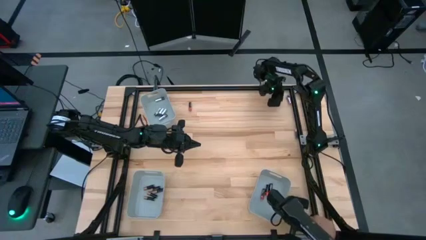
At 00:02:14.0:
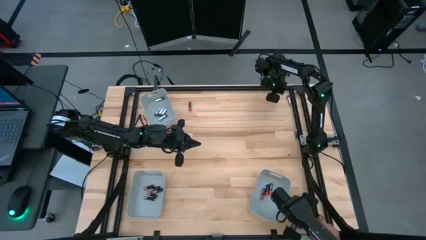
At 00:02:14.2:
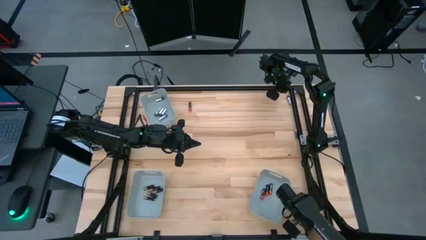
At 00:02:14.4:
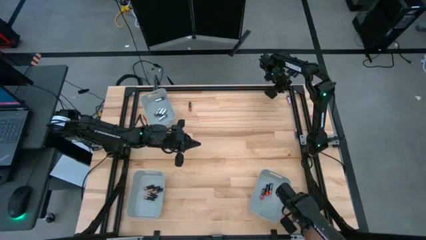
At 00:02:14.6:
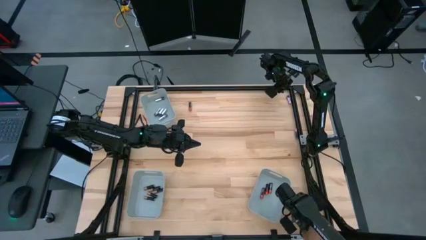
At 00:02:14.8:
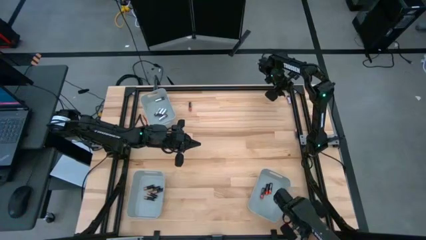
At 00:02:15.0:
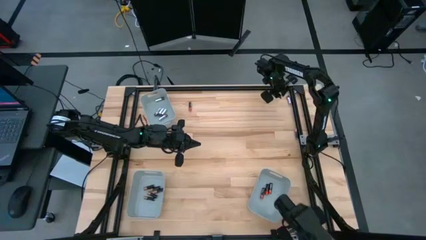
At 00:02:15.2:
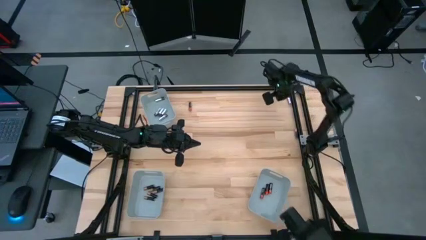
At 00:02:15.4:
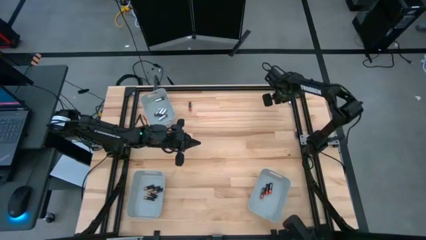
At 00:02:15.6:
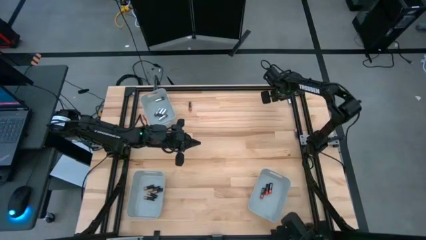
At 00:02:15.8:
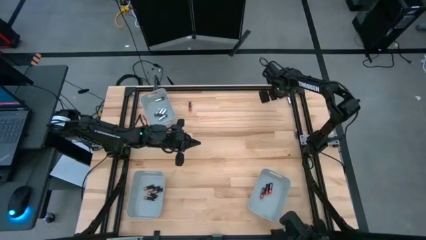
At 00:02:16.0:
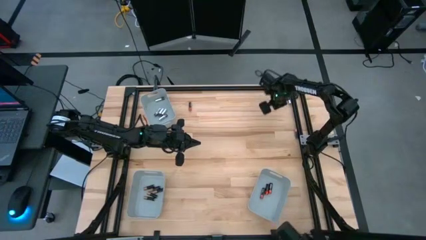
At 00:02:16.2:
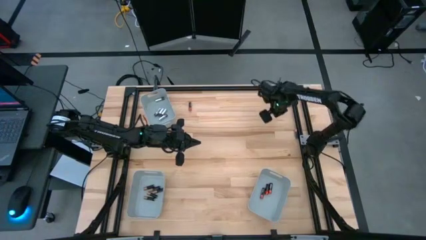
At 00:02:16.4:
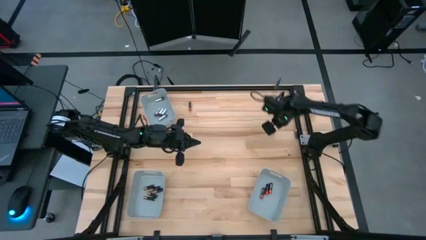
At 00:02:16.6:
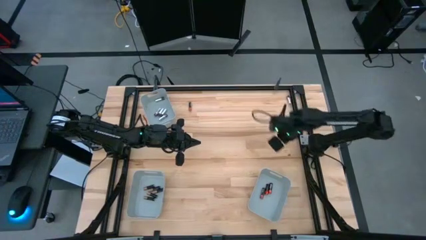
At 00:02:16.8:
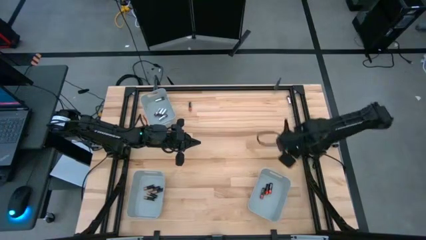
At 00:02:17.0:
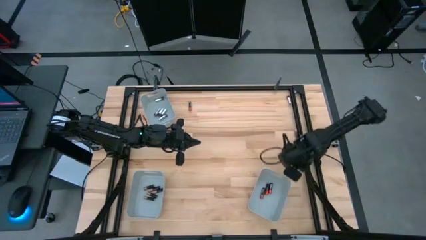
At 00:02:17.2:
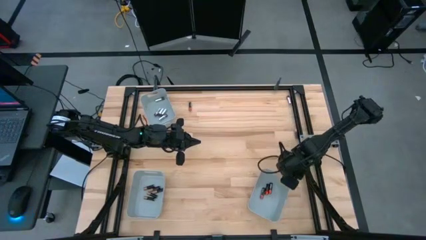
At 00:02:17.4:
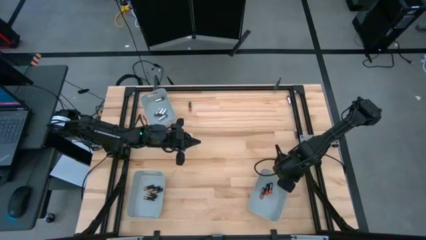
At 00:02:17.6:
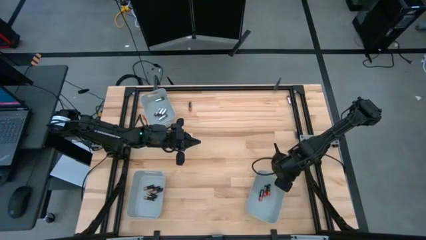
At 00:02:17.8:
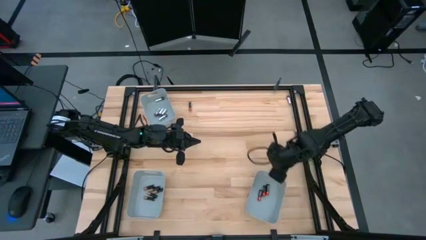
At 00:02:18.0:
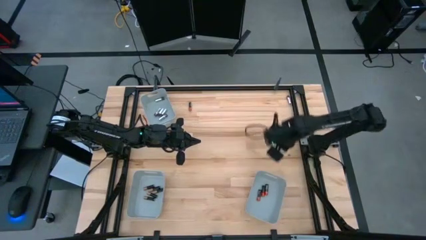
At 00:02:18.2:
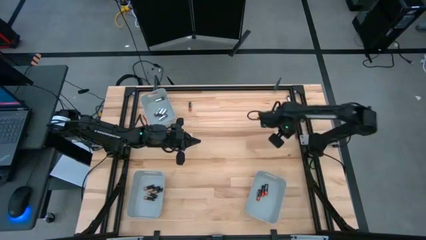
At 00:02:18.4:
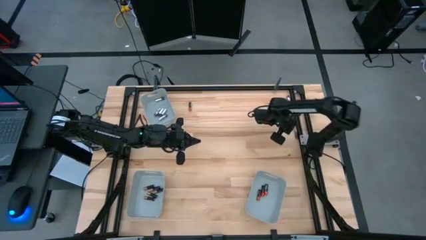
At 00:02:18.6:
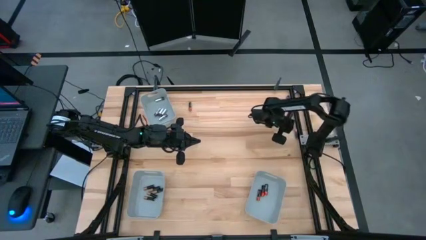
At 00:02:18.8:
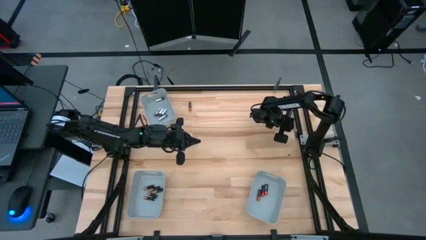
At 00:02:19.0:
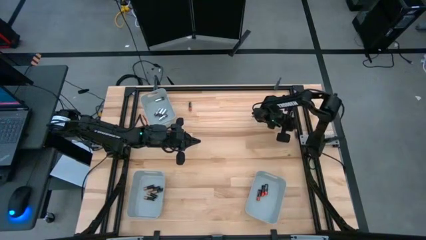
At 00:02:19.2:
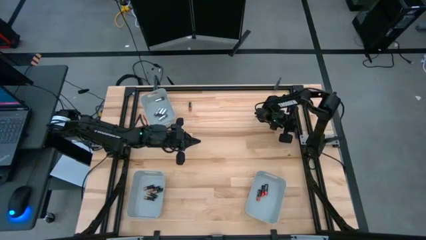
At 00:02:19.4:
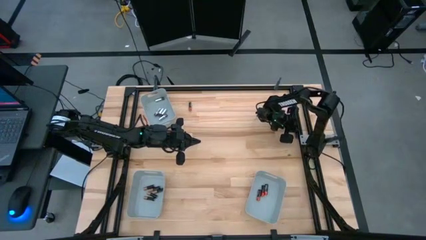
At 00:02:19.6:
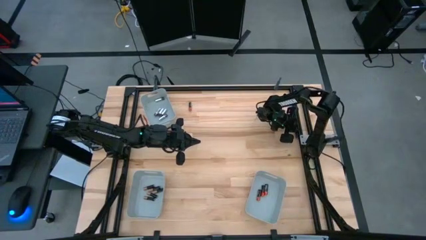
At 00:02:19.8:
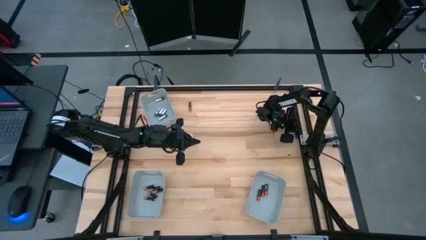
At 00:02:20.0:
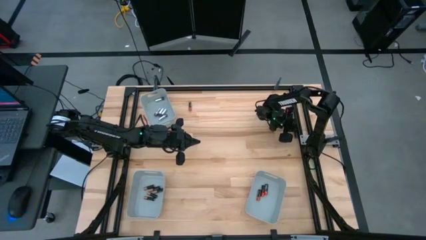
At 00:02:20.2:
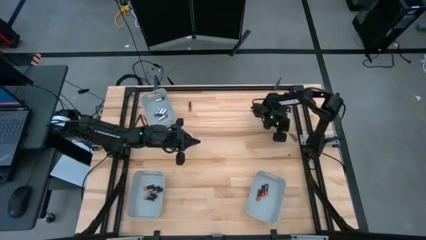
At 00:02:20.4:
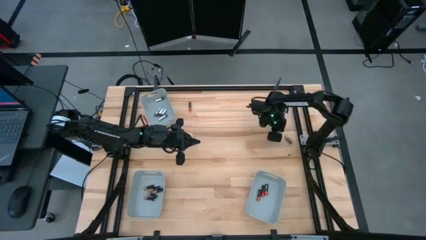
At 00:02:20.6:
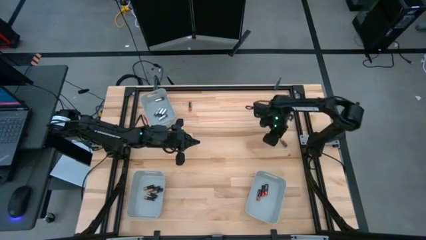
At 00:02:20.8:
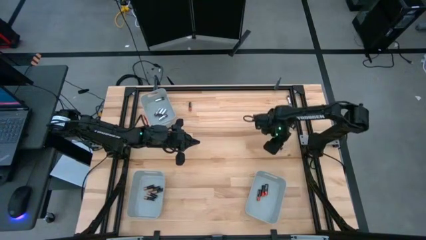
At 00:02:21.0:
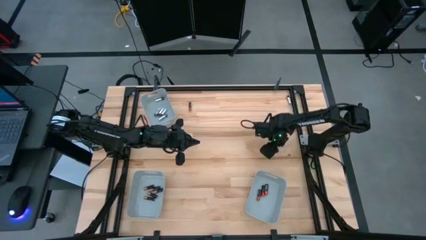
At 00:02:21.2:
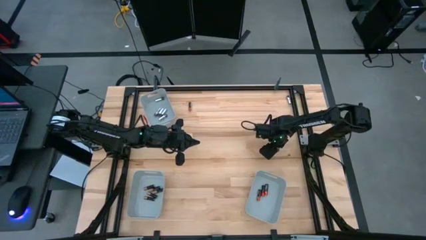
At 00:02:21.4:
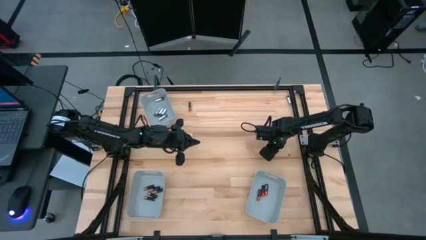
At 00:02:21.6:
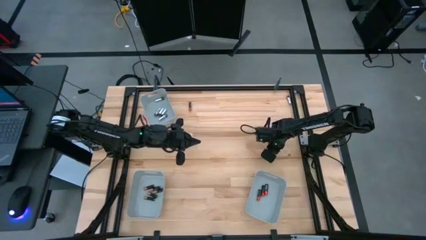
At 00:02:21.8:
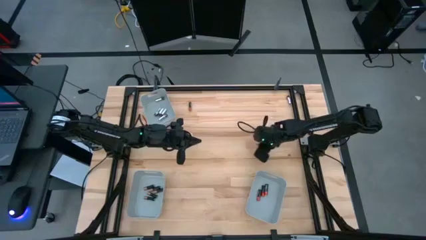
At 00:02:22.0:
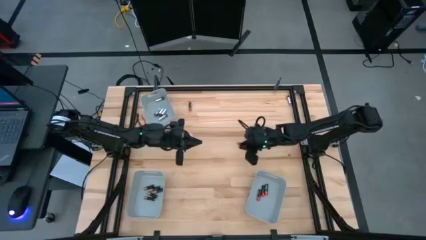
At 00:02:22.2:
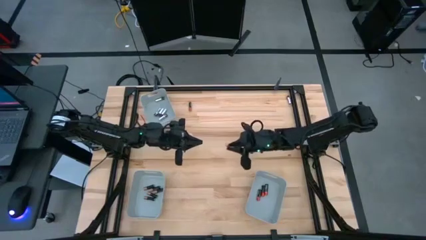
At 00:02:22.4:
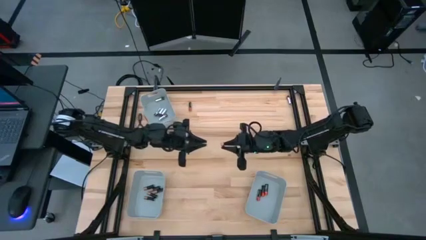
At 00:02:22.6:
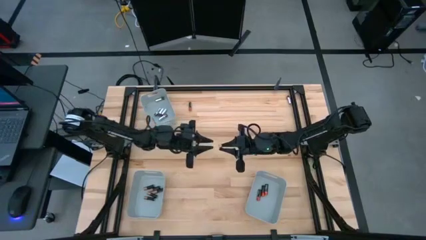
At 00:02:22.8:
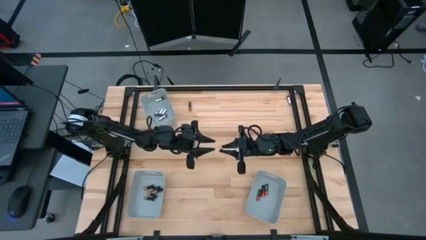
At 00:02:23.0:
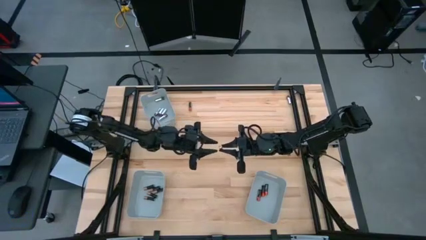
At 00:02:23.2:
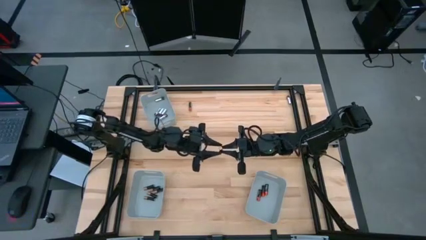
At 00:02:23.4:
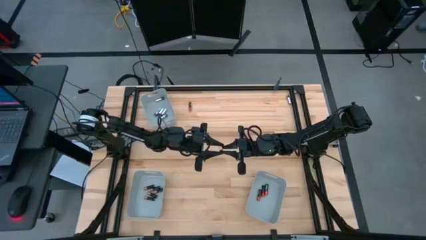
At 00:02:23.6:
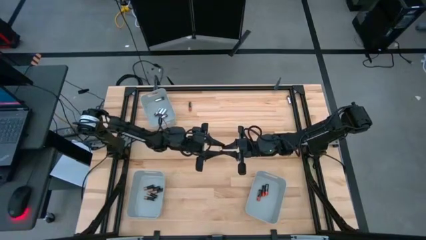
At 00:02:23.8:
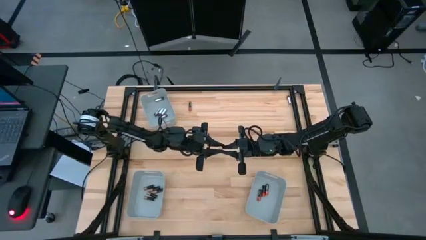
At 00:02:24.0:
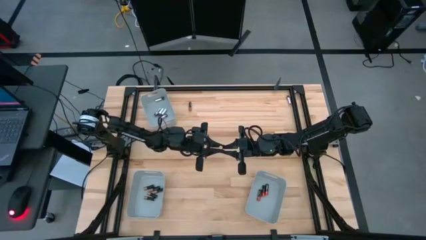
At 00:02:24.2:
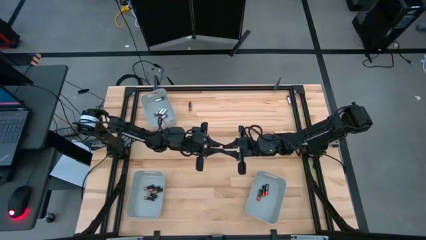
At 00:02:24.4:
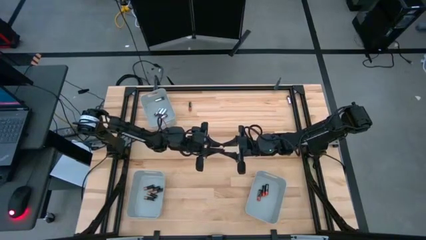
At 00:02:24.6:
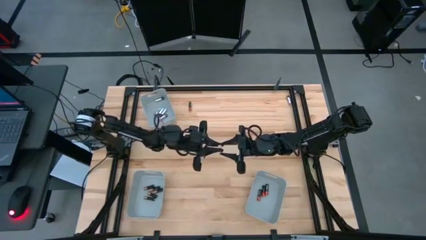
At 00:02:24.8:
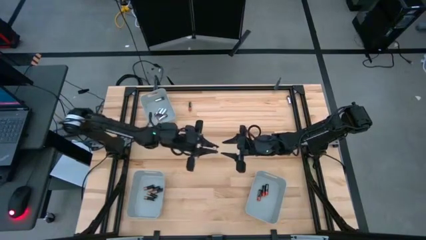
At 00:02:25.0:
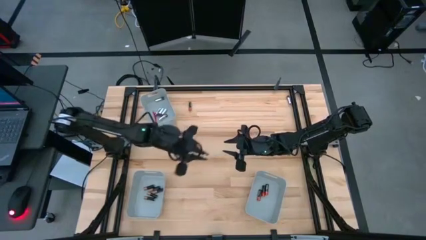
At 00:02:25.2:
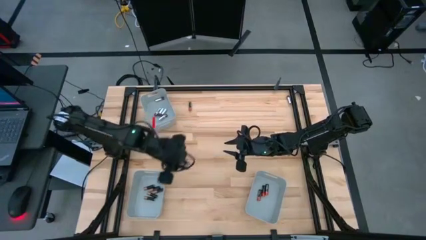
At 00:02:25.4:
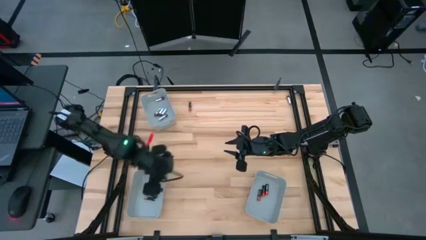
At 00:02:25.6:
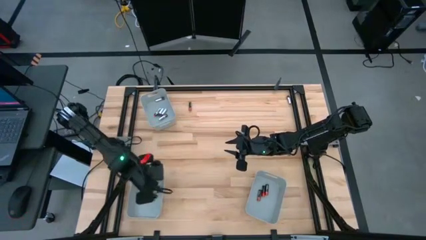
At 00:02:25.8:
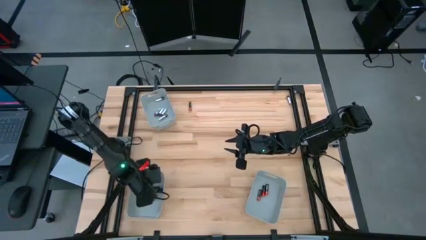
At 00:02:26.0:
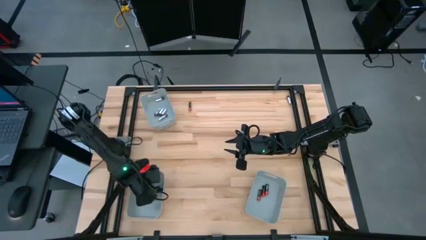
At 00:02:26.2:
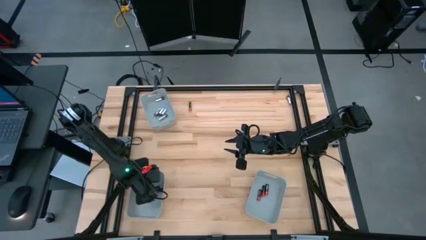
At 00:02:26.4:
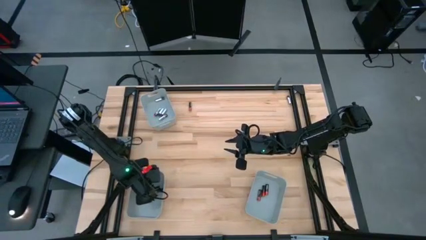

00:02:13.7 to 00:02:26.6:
Task: Sort batteries
Put the black-brown battery into the bottom left gray bin

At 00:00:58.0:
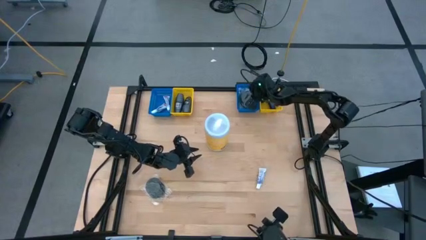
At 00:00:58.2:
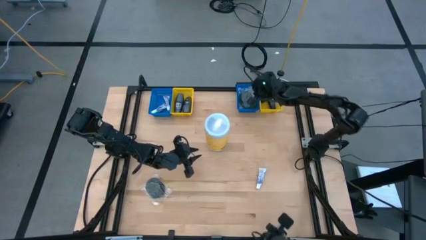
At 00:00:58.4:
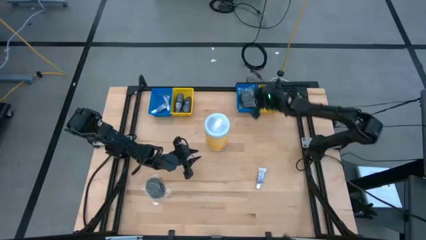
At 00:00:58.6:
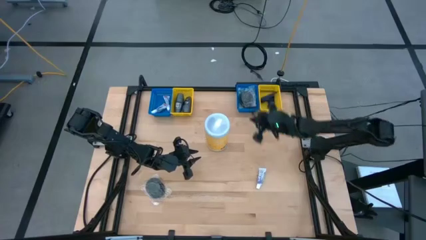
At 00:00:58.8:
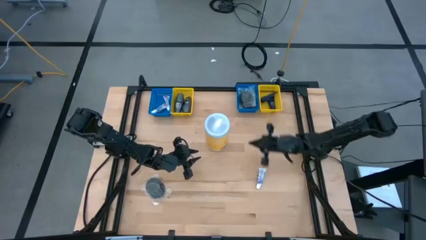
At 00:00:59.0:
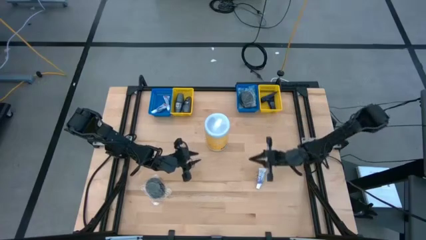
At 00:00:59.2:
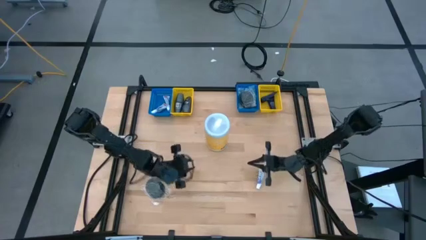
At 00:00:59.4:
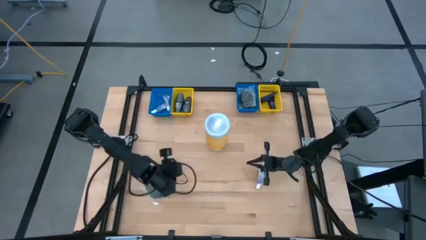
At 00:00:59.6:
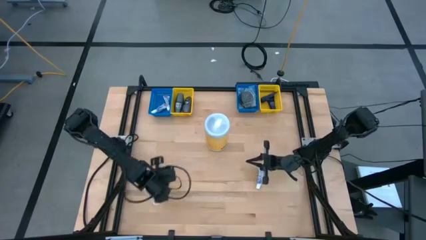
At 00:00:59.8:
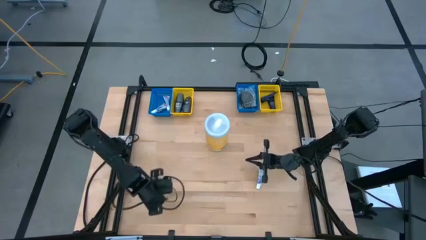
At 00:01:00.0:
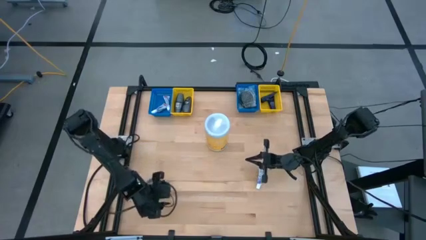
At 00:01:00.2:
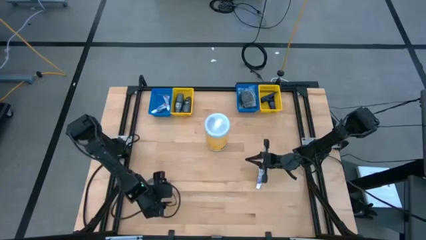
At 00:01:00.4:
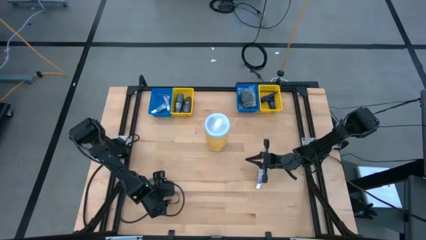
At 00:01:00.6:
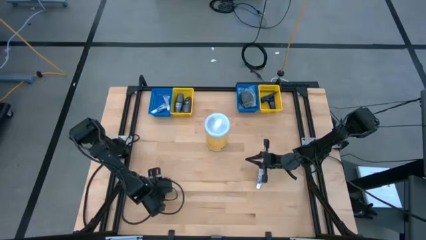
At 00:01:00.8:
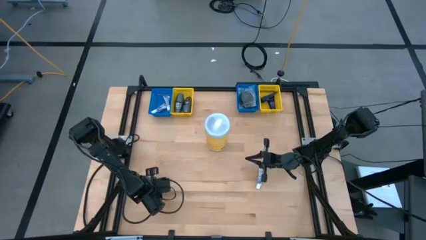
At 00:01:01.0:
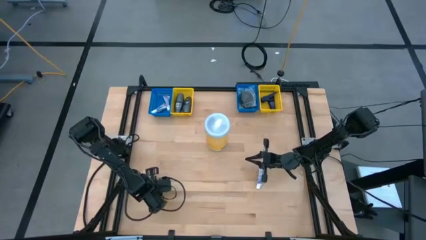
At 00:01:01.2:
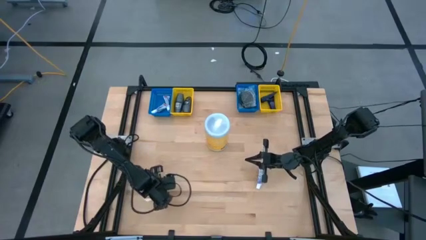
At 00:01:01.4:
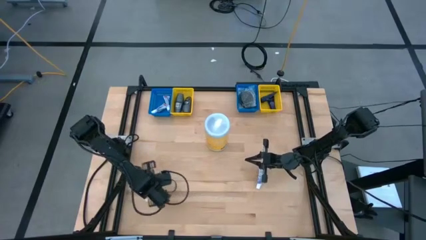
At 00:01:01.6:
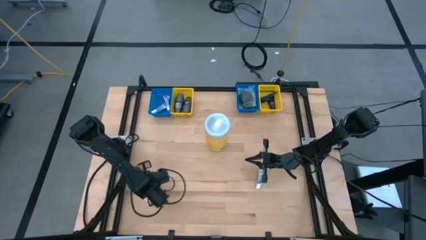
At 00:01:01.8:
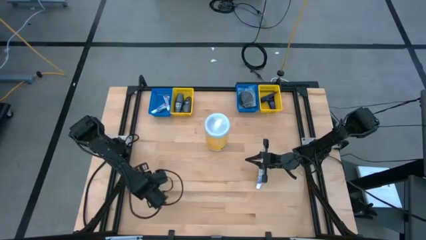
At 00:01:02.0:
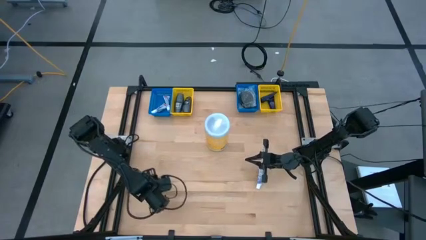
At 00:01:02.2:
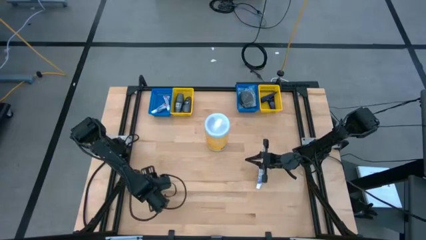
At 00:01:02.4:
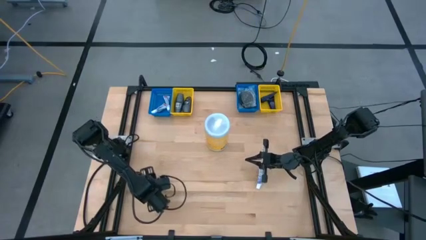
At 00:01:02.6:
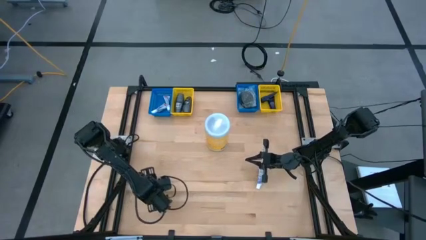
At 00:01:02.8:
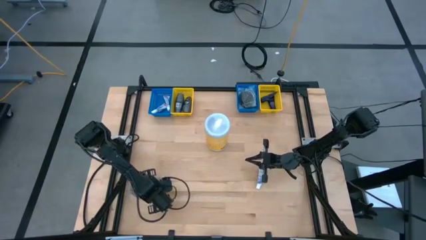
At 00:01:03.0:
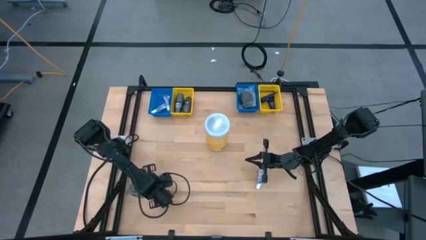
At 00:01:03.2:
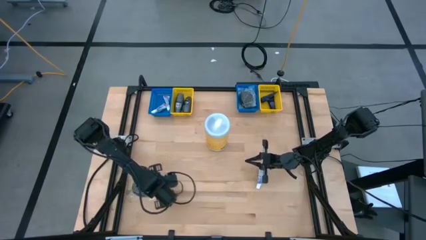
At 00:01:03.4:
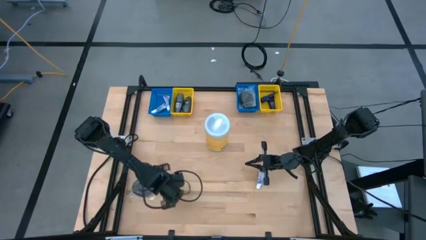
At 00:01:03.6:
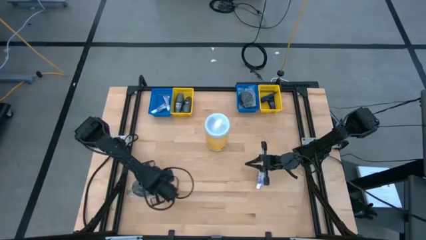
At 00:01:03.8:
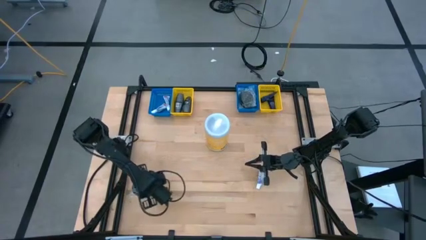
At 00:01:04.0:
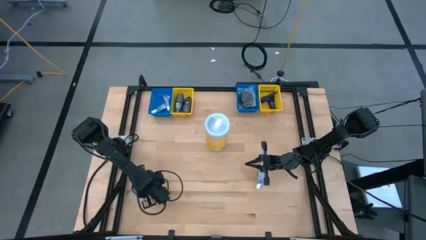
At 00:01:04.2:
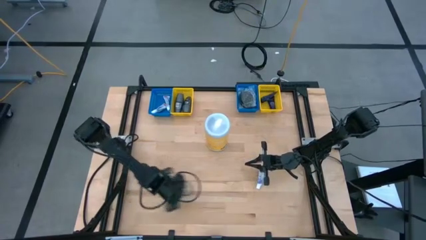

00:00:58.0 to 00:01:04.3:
Task: Pick & Place Travel size toiletries
Put the hairbrush into the right blue bin
